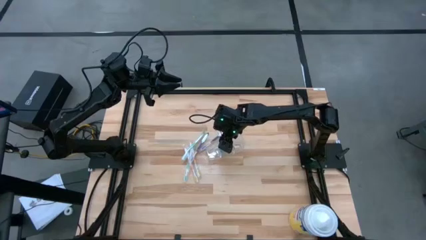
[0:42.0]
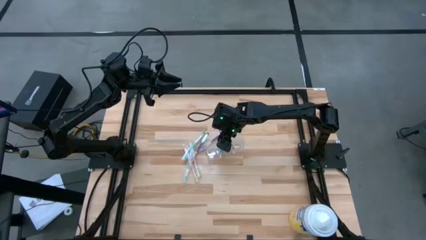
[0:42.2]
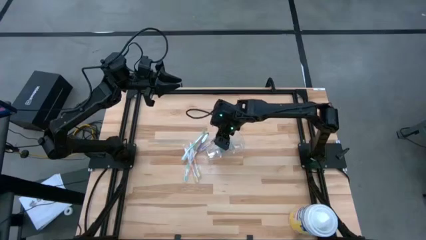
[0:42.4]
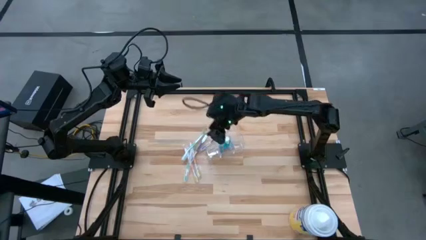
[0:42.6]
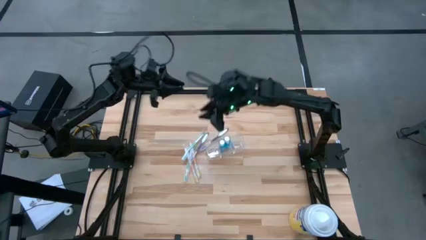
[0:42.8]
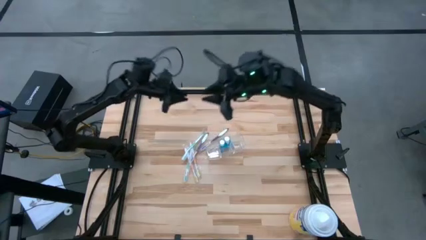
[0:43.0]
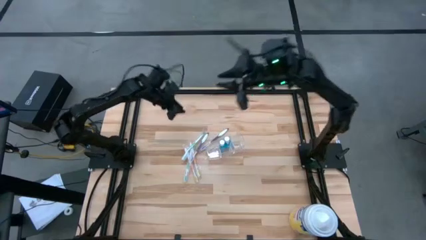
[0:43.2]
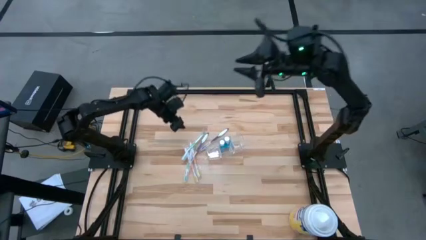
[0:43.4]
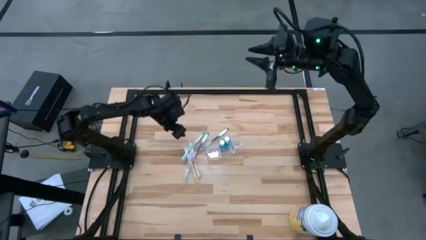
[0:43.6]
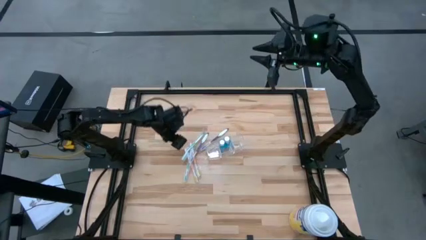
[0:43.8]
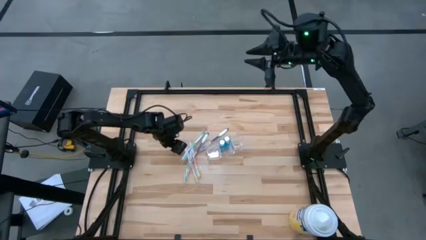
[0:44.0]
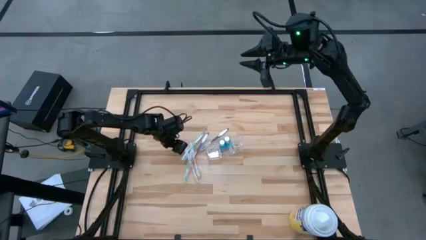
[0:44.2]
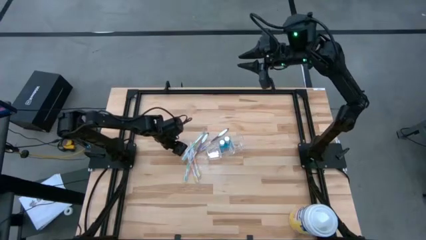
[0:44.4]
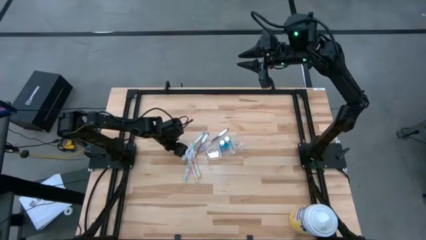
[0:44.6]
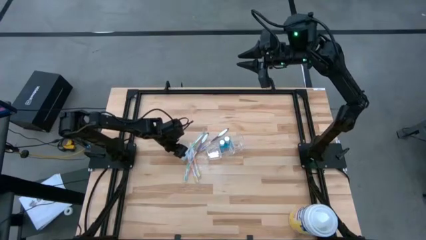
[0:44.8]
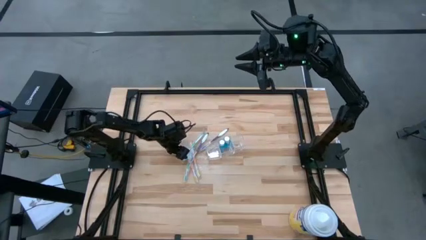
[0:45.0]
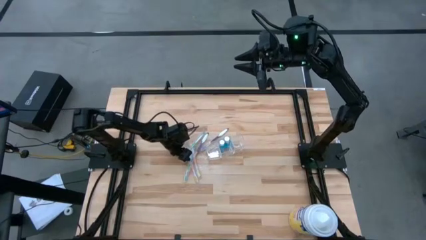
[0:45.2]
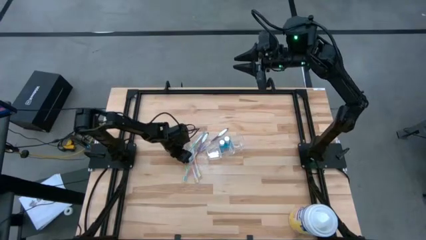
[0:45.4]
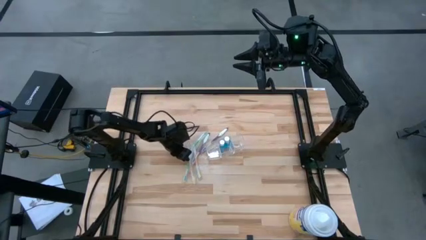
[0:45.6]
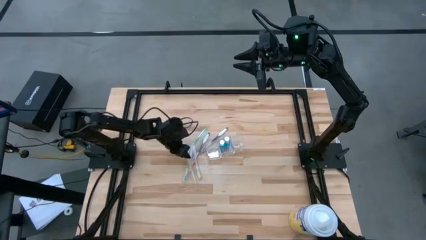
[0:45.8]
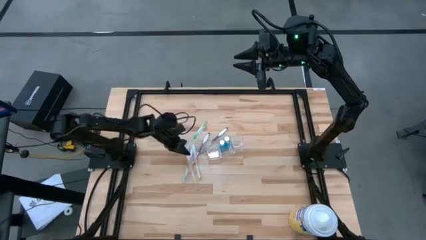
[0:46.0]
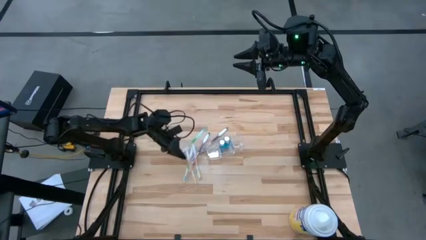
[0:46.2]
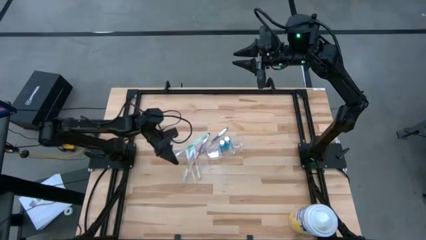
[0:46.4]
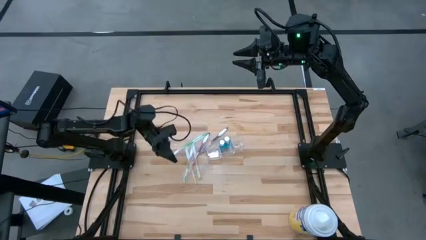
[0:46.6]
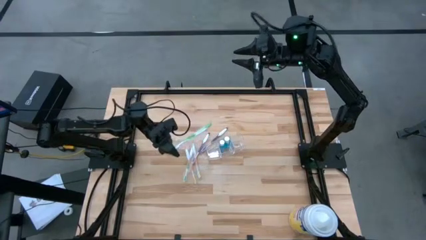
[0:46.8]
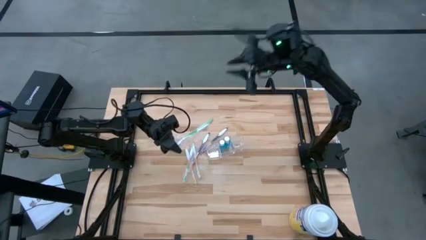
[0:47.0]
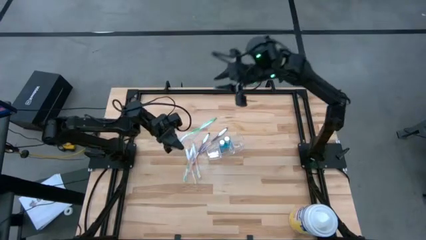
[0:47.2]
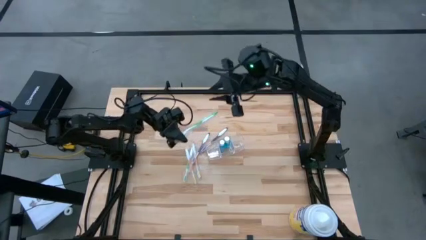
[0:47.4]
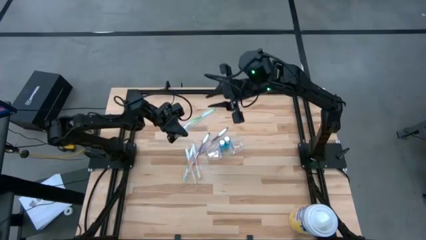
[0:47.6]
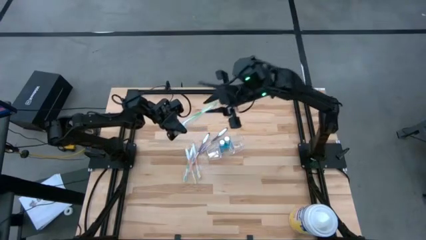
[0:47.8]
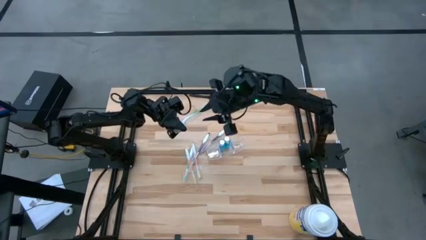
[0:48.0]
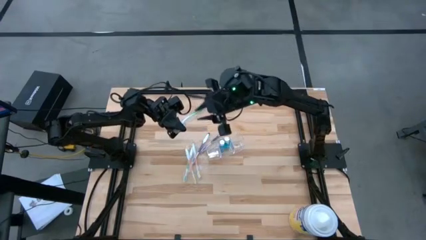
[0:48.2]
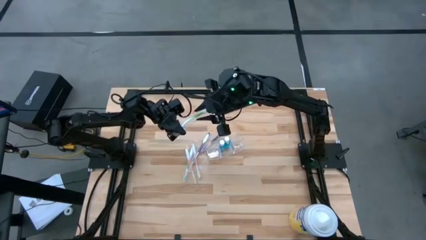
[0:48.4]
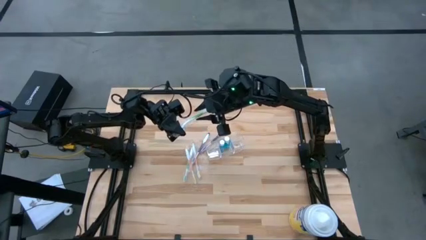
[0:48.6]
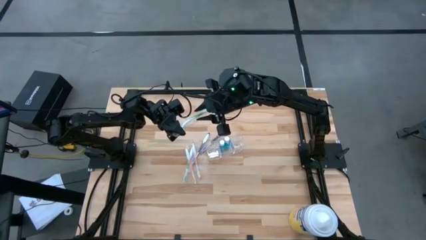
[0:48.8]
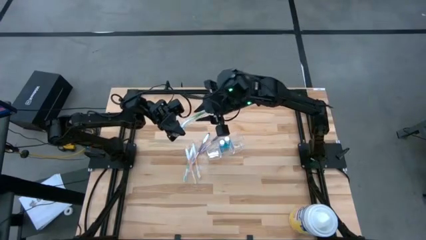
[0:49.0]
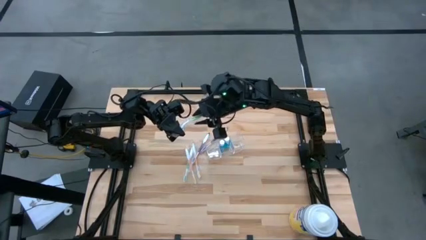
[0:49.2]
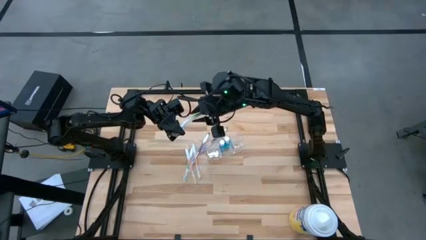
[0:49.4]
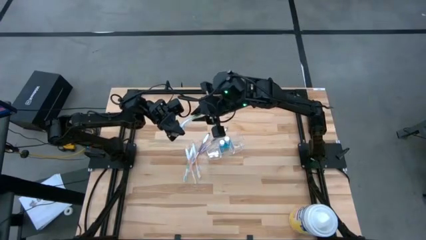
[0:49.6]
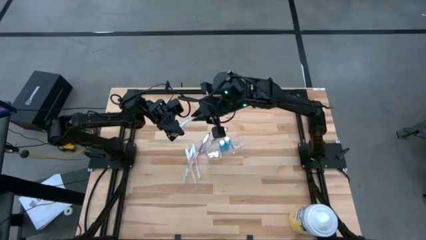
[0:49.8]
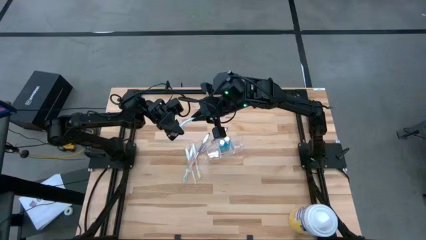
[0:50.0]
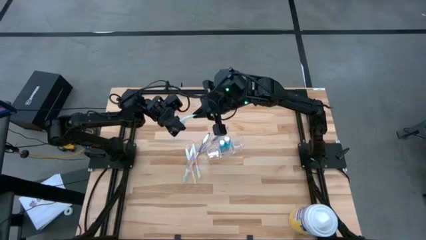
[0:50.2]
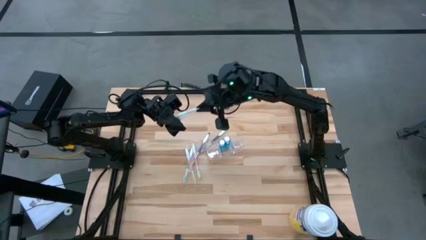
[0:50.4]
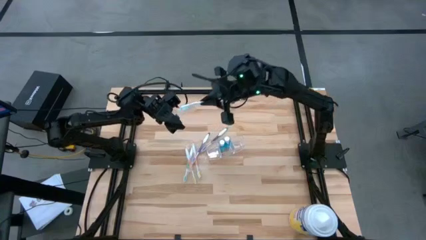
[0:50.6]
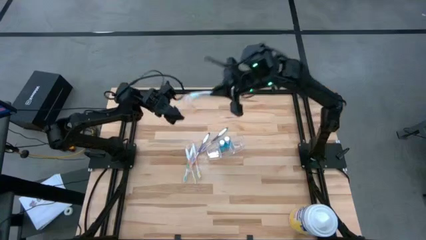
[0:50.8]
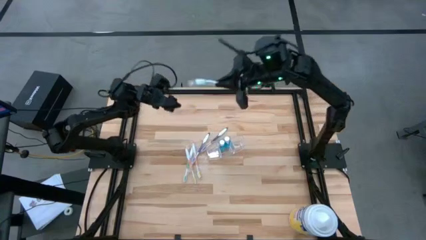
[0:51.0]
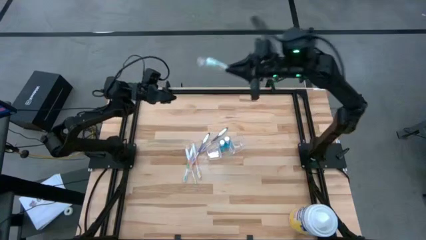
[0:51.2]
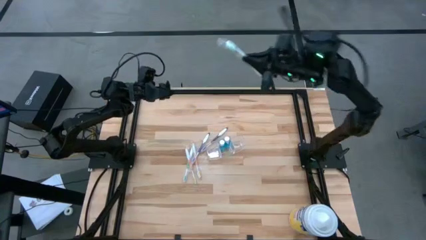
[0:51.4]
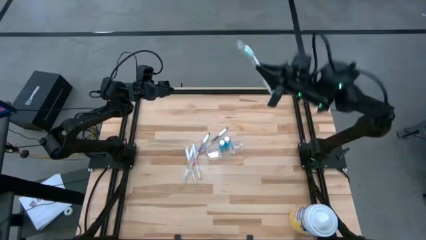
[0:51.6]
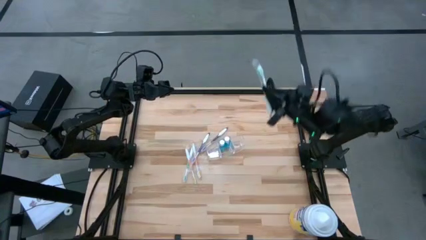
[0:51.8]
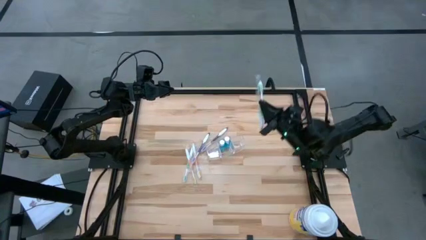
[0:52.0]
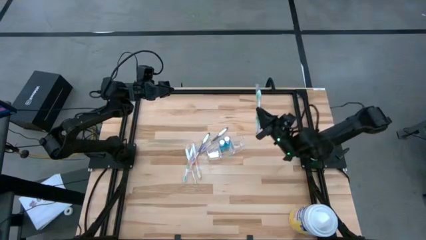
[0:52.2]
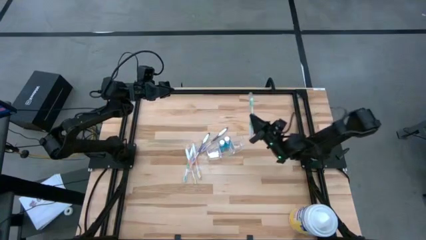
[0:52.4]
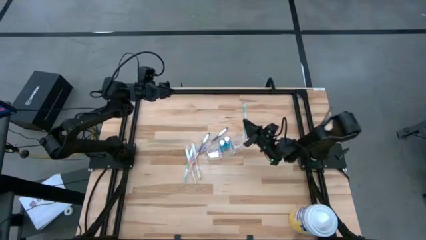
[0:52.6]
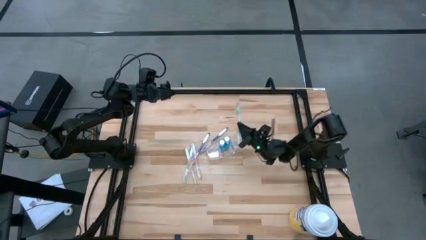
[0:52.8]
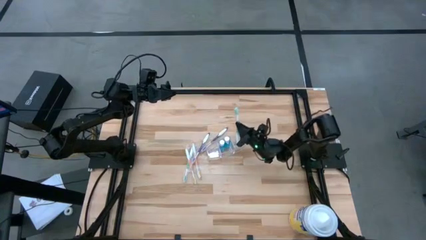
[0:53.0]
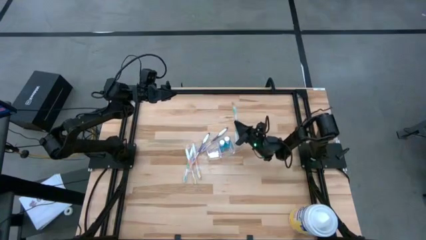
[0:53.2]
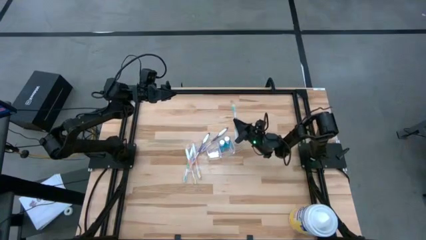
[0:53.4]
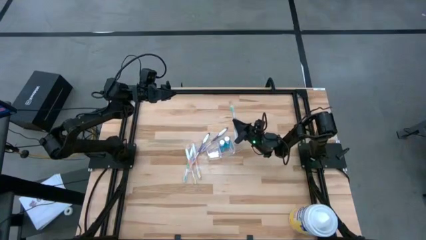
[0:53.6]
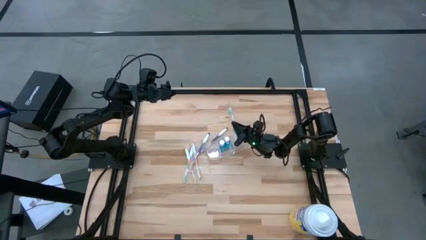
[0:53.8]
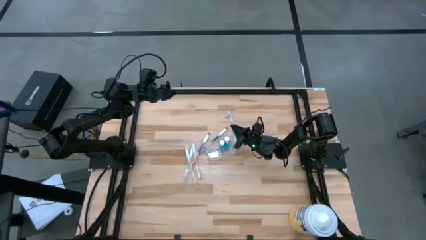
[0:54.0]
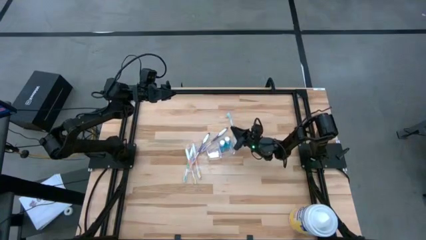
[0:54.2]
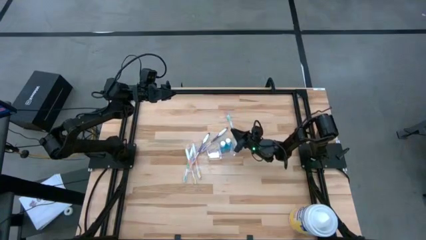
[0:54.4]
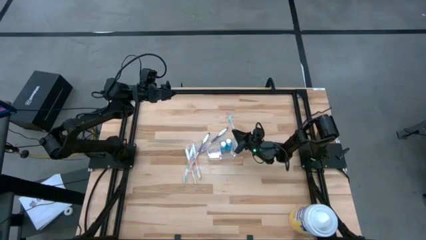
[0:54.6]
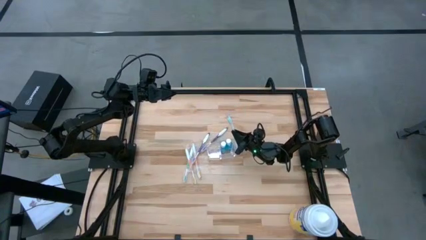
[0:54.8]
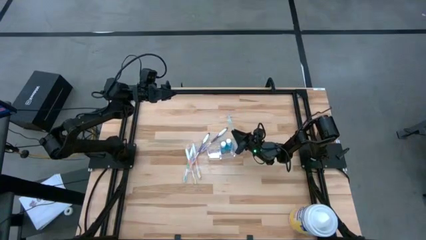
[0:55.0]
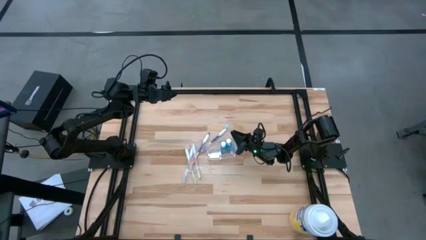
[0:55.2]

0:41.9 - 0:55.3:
Task: Pick & Place toothbrushing station
Put the green toothbrush into the transparent organizer
